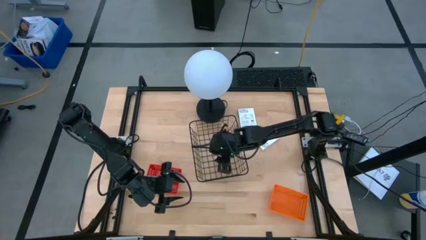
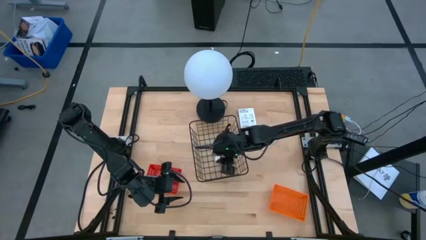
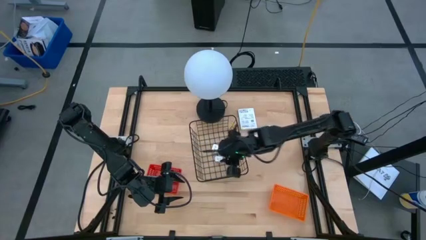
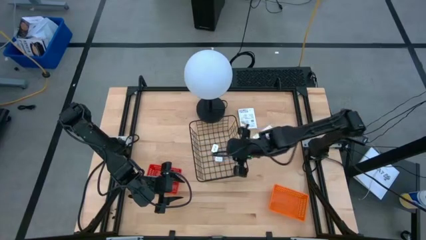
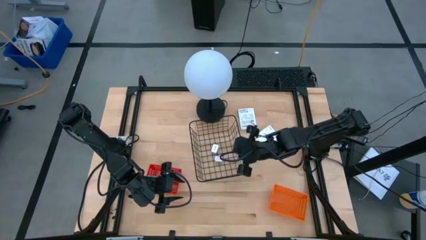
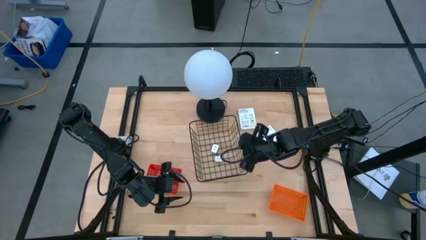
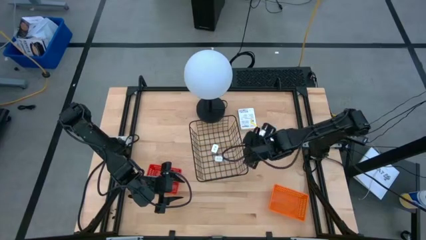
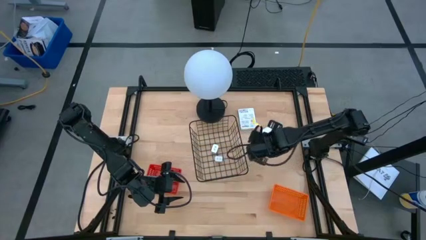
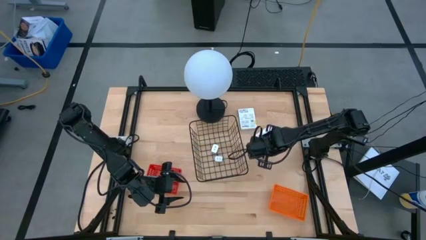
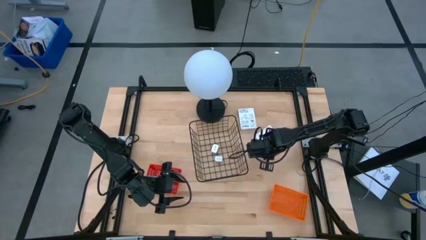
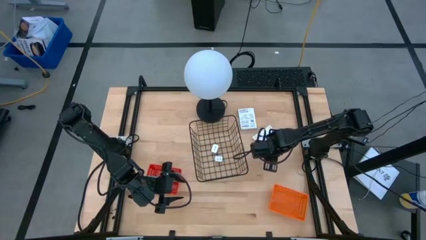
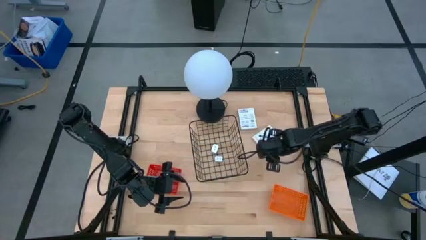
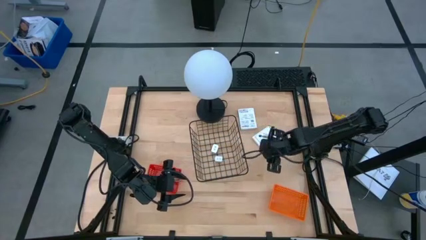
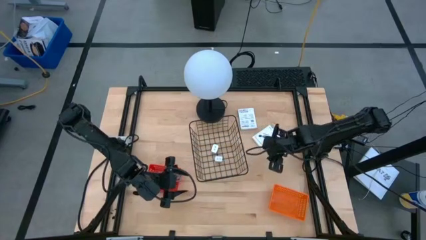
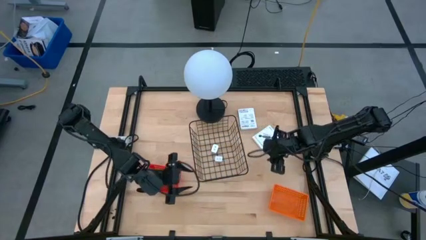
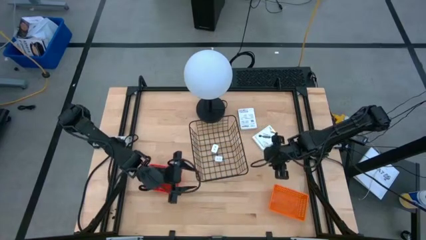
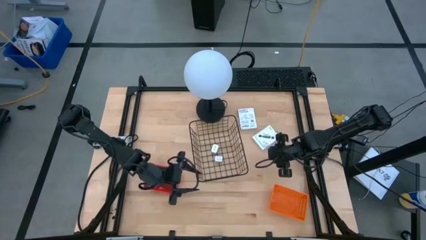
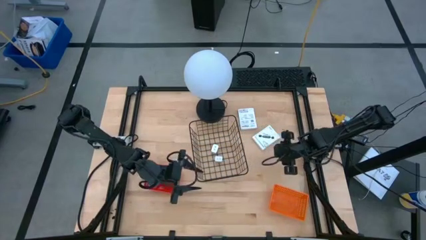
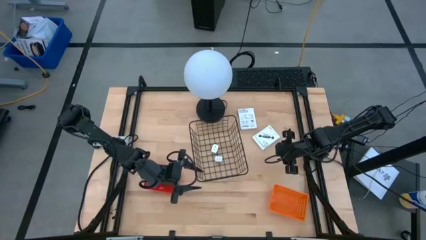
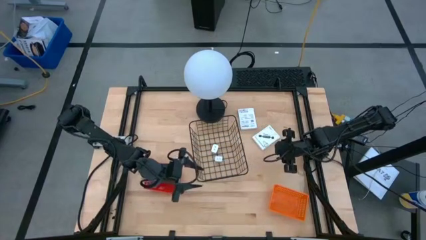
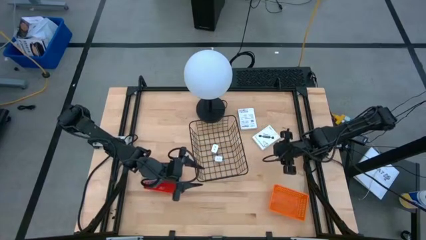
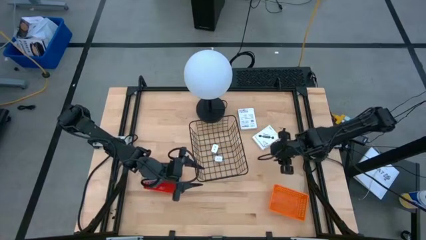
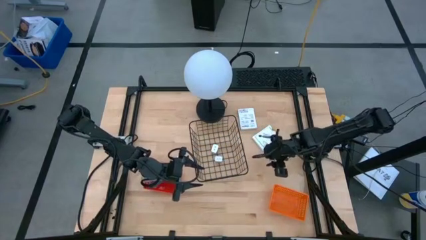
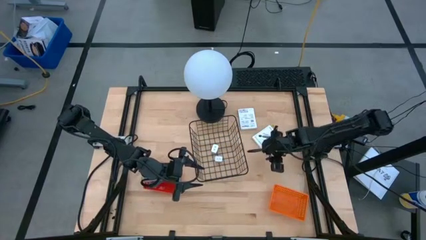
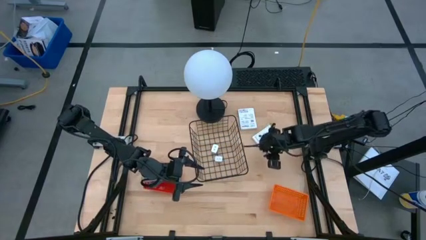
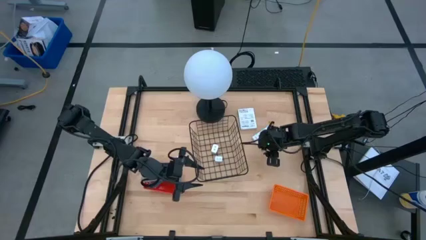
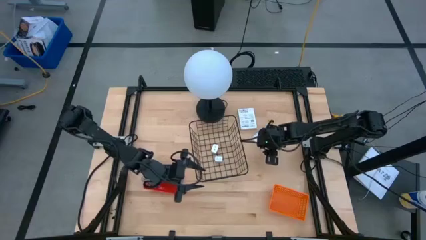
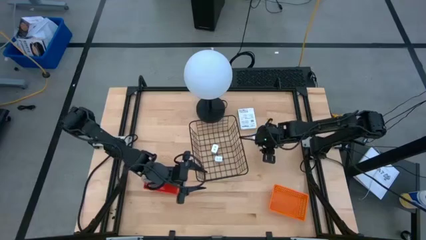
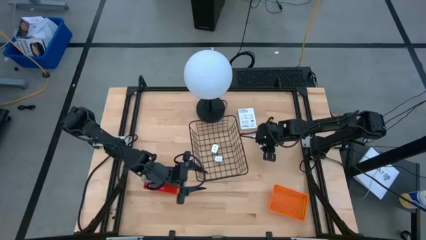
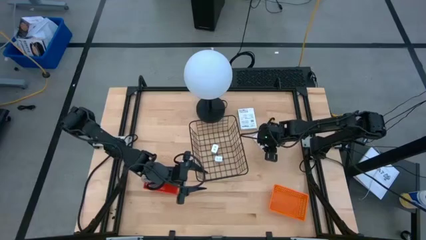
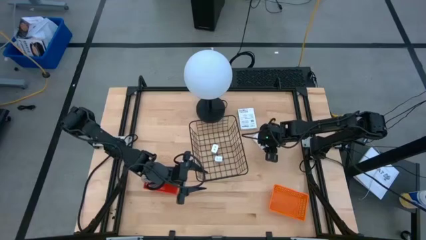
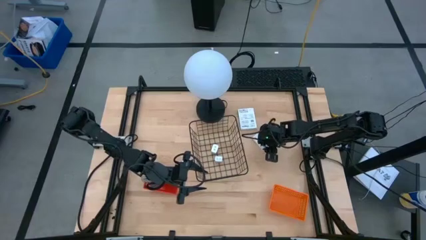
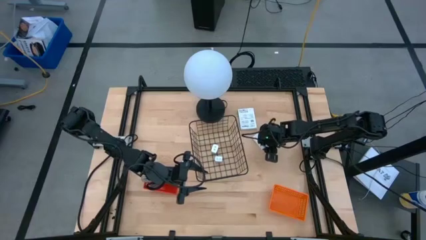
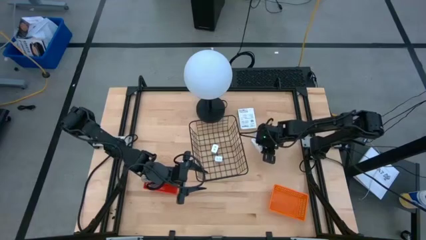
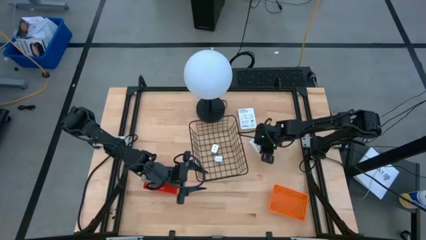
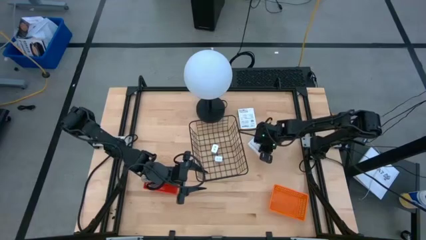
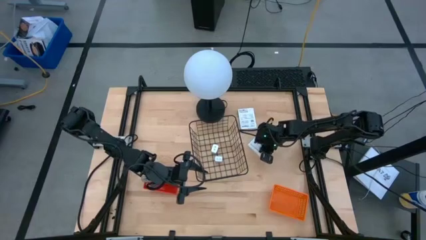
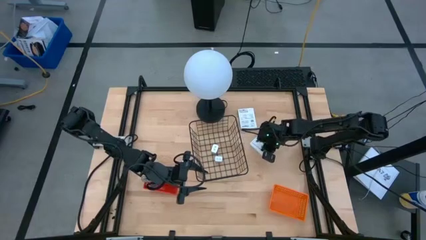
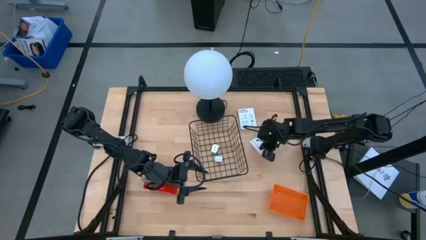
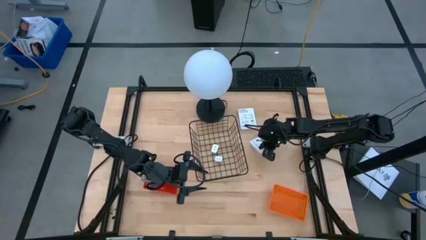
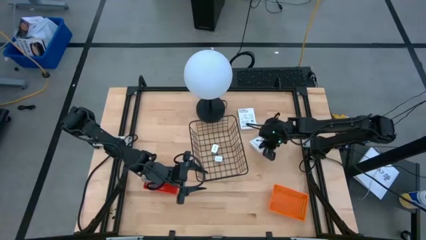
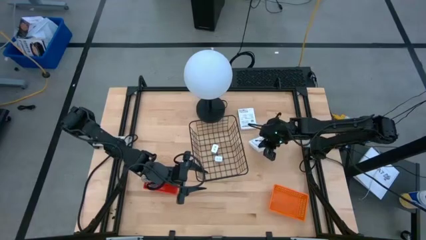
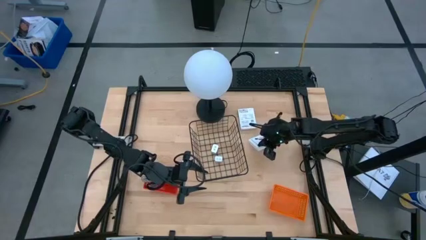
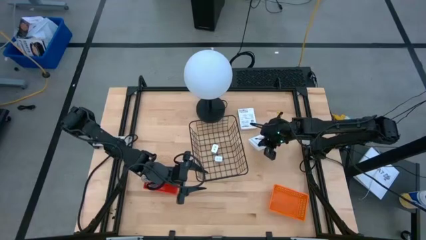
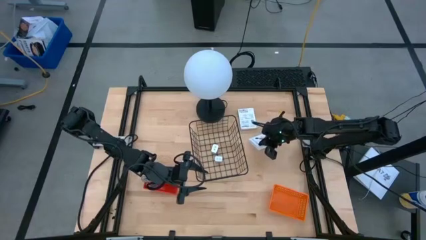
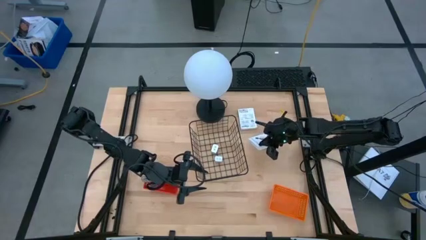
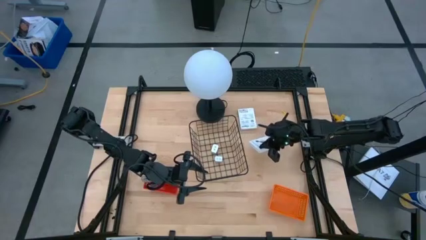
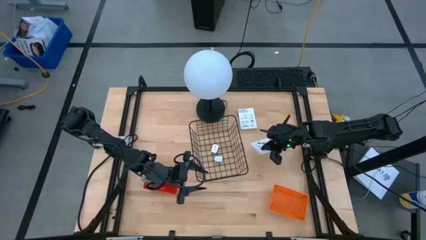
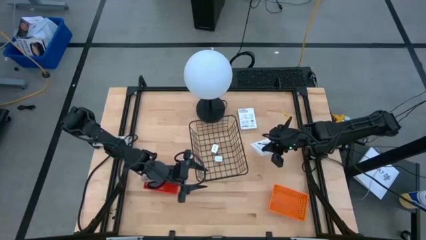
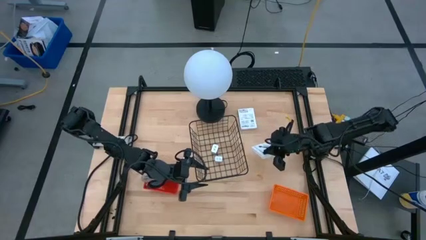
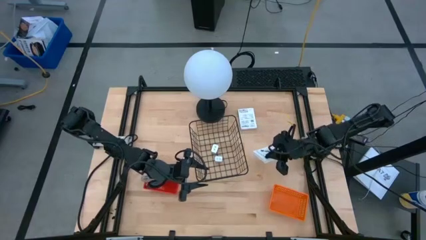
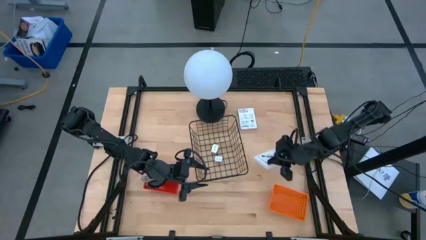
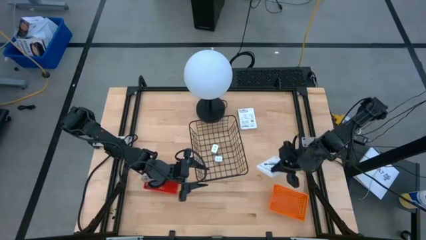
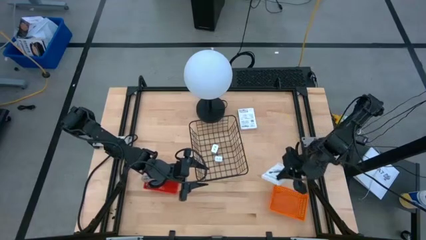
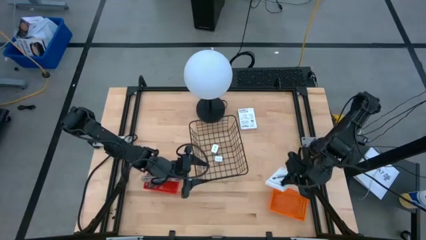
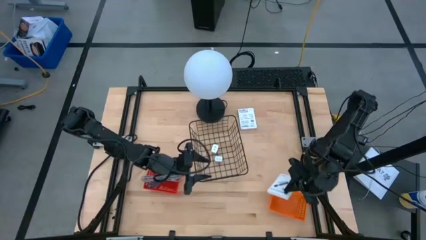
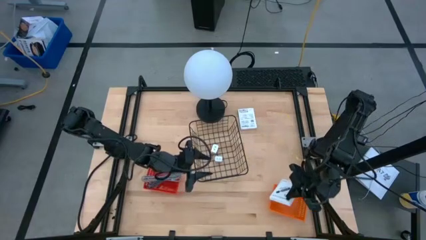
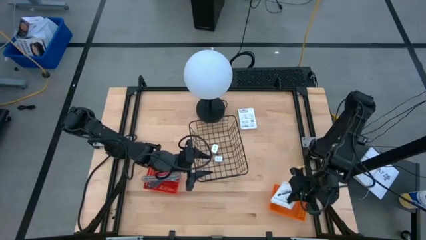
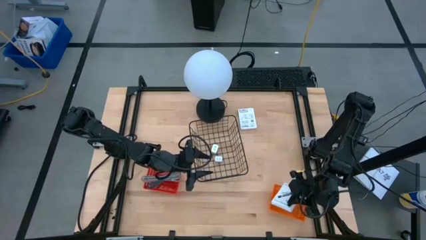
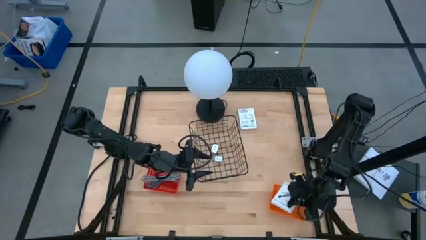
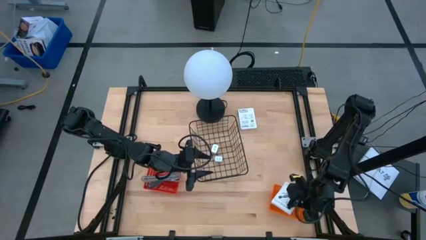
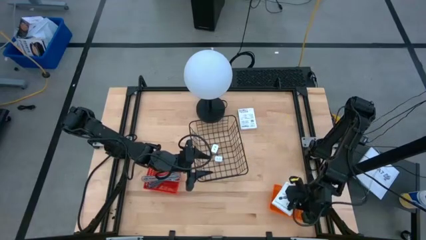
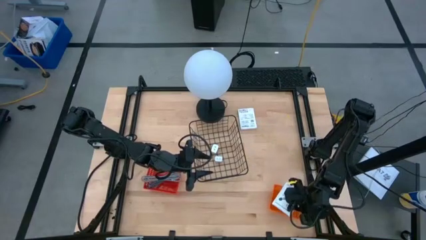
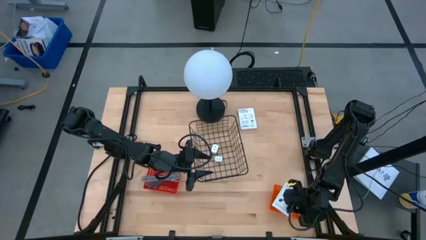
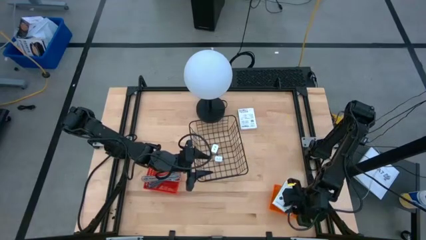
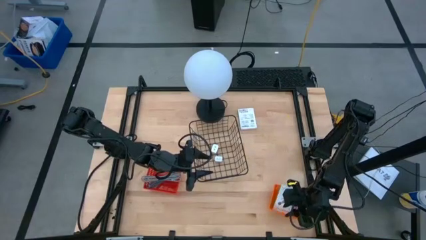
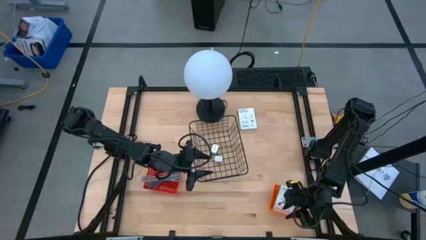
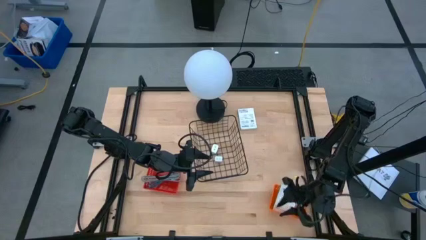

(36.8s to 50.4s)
Task: Pick and place items into bin
Put the bottom card reader box into the orange bin

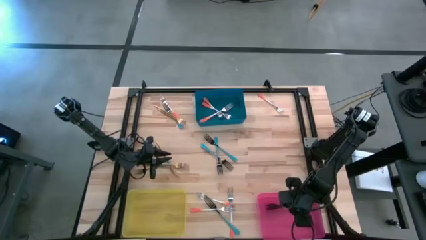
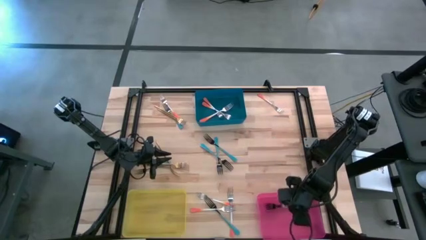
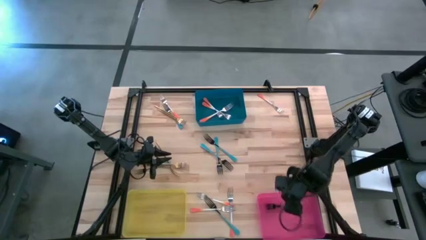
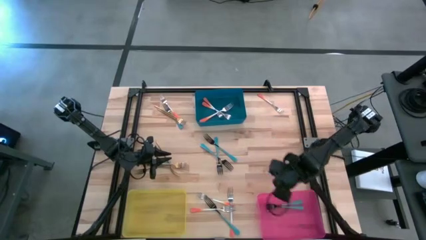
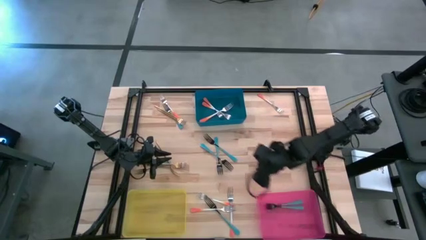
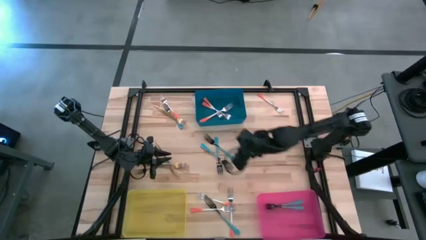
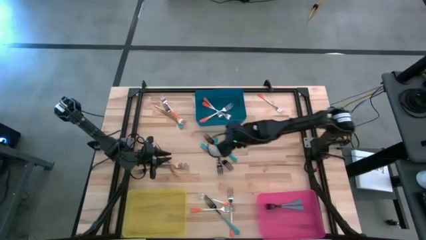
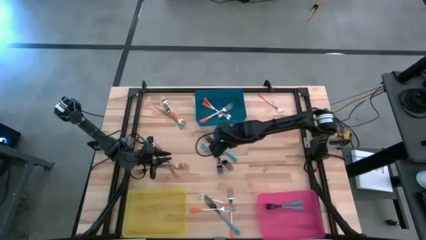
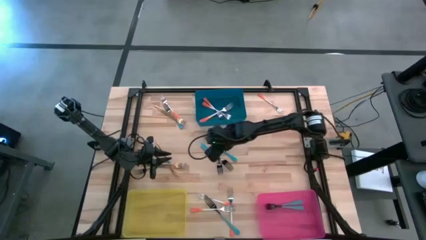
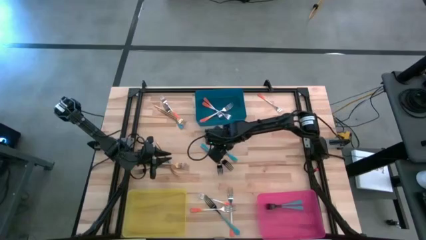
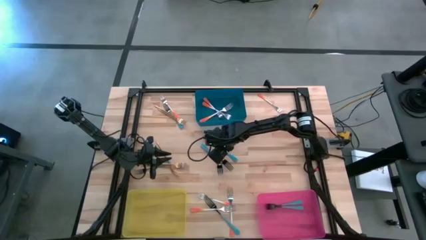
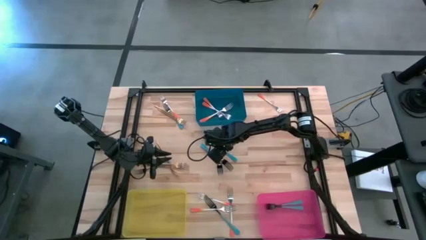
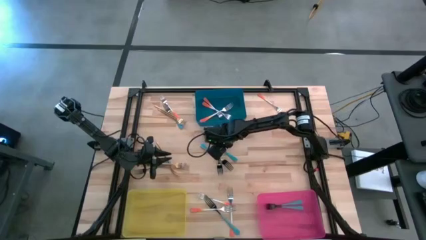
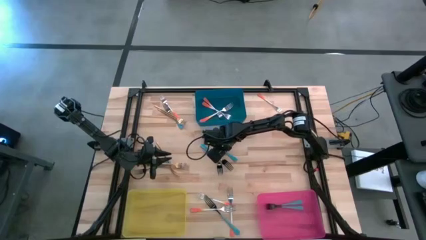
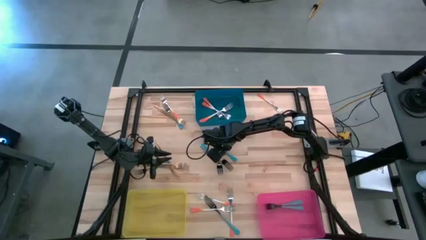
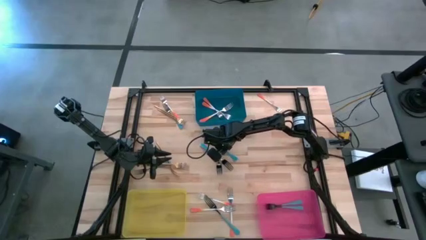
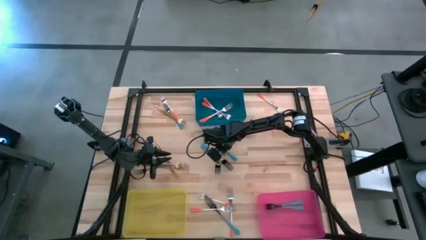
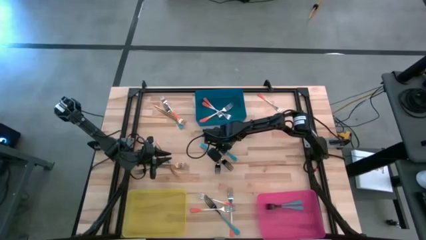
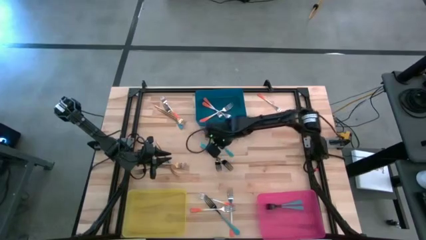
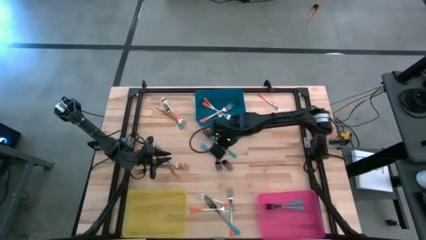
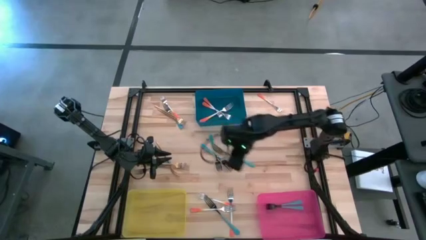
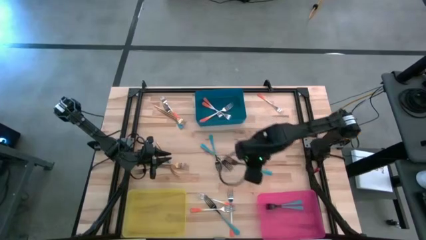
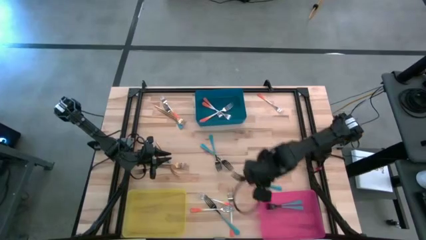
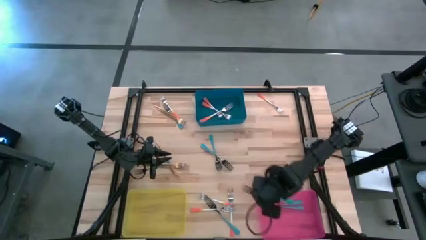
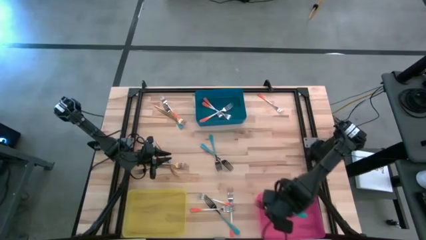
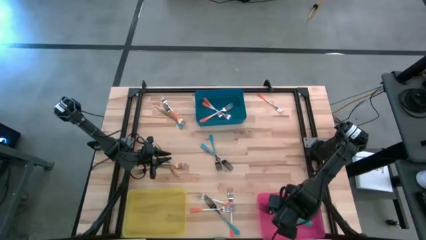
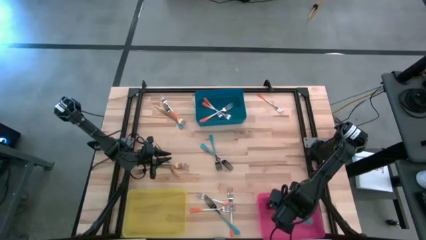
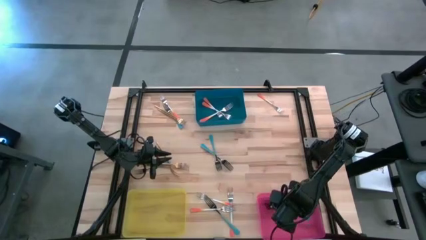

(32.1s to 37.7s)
Task: Sort silverware by color (type)
Put the blue fork into the pink bin
